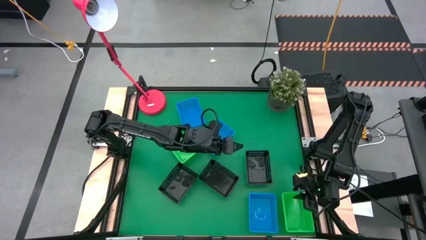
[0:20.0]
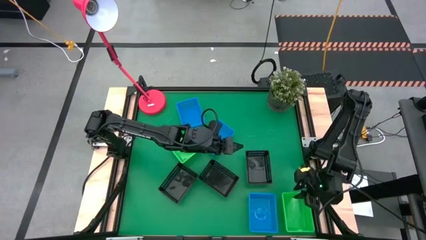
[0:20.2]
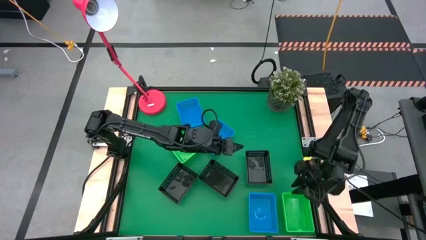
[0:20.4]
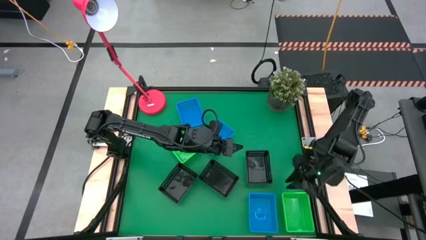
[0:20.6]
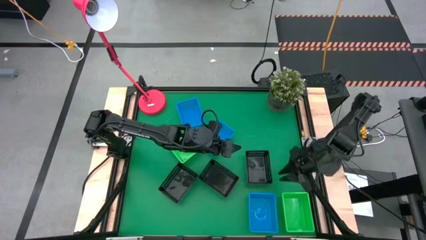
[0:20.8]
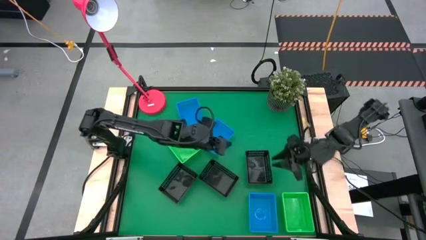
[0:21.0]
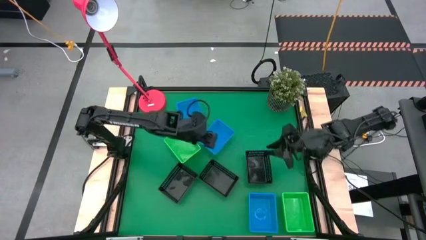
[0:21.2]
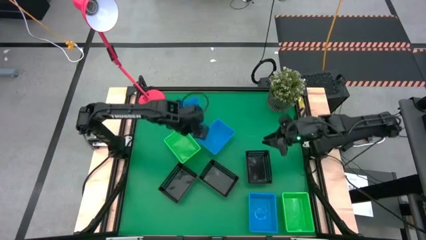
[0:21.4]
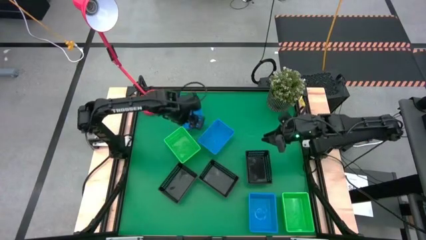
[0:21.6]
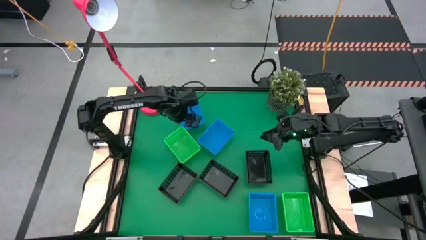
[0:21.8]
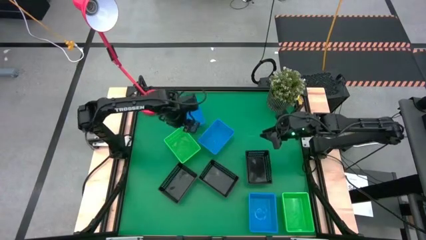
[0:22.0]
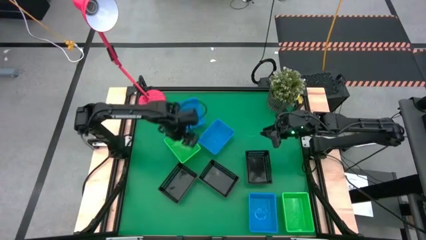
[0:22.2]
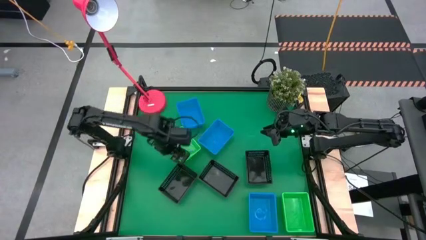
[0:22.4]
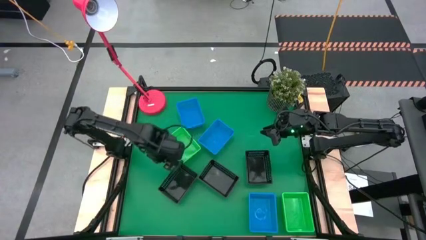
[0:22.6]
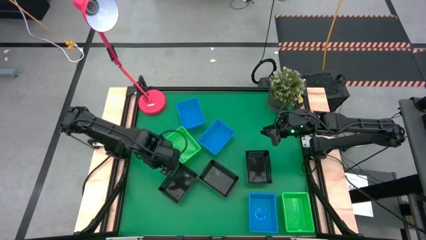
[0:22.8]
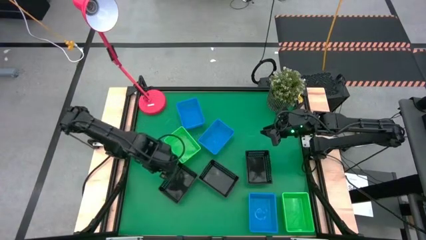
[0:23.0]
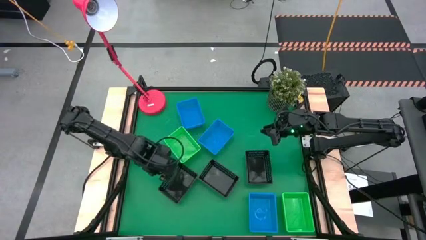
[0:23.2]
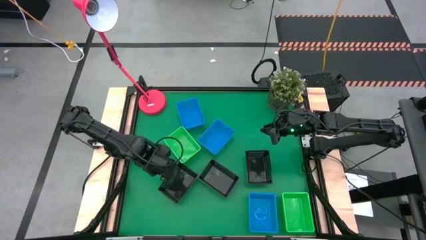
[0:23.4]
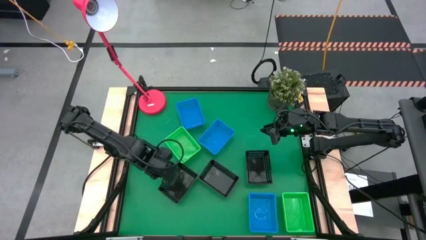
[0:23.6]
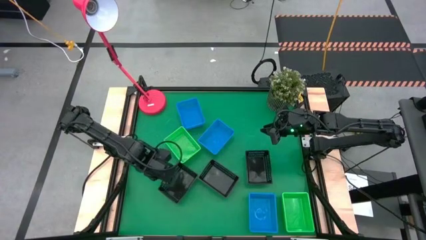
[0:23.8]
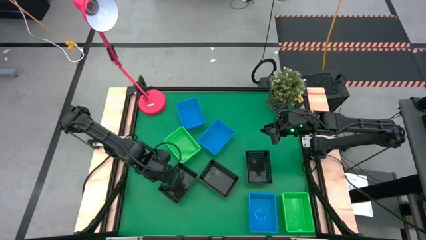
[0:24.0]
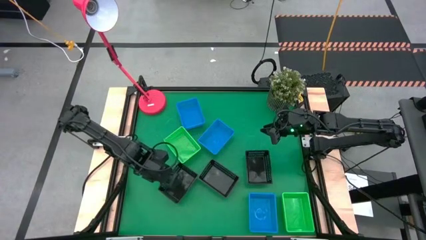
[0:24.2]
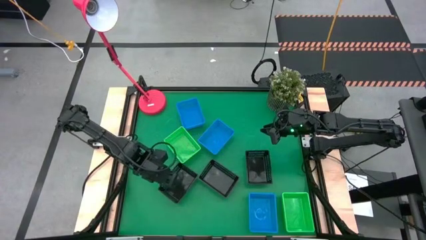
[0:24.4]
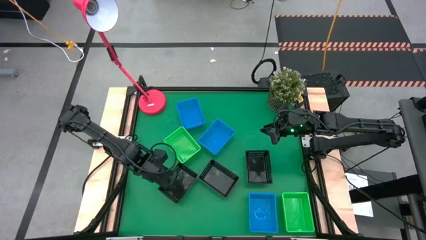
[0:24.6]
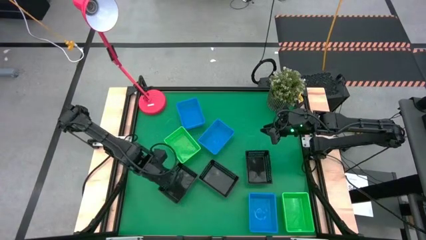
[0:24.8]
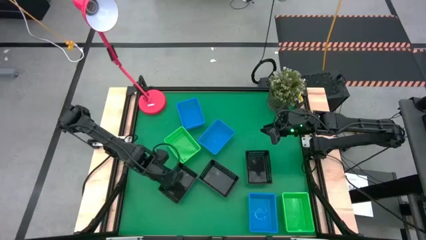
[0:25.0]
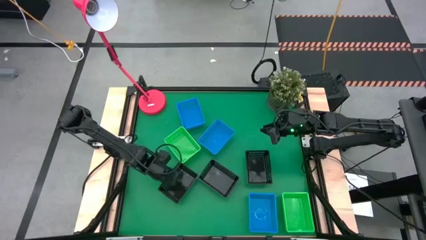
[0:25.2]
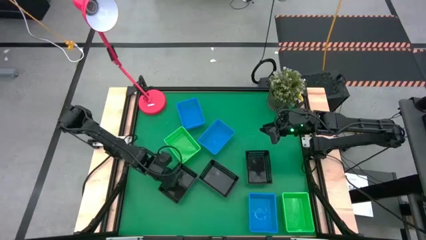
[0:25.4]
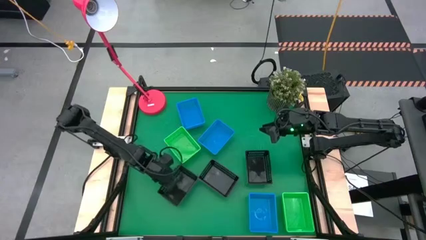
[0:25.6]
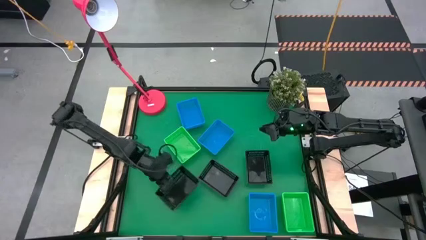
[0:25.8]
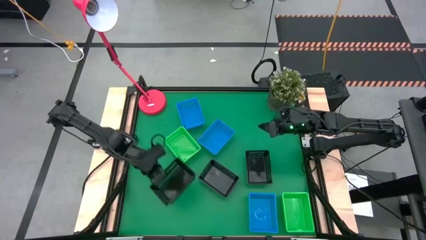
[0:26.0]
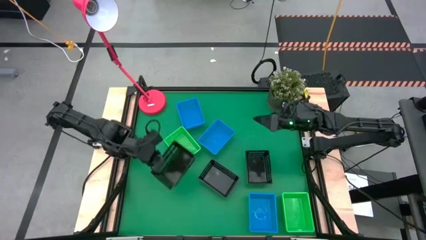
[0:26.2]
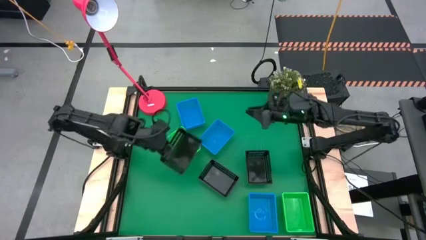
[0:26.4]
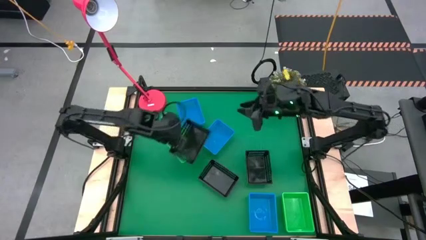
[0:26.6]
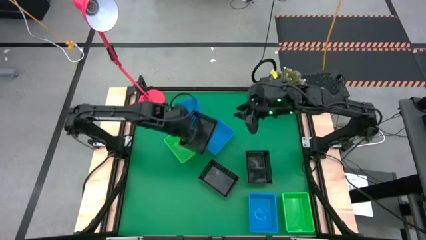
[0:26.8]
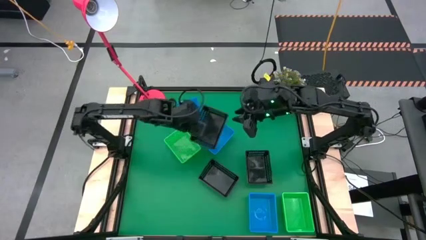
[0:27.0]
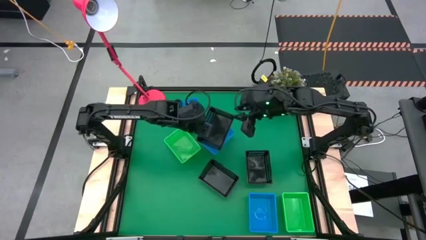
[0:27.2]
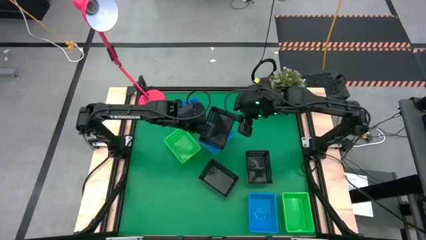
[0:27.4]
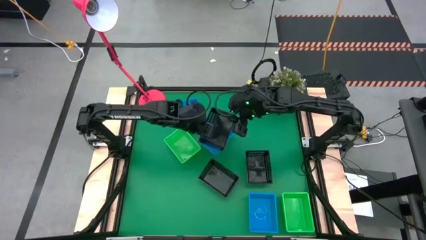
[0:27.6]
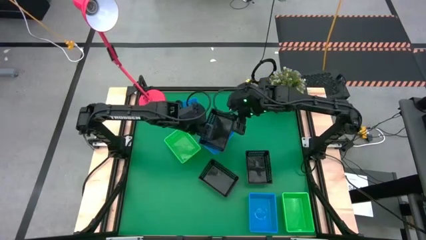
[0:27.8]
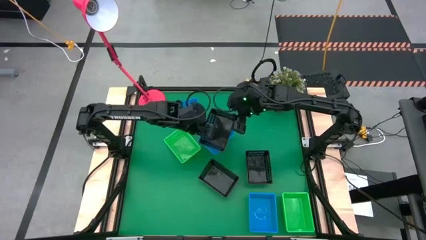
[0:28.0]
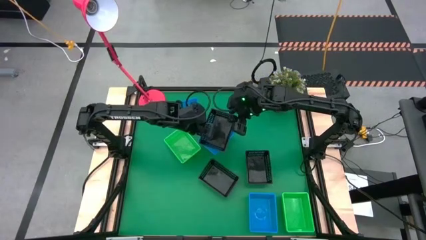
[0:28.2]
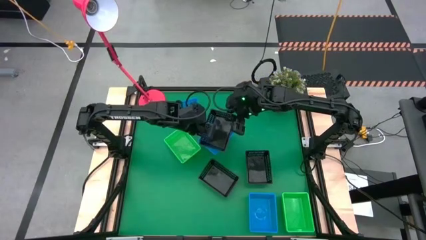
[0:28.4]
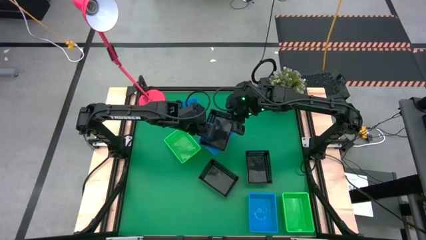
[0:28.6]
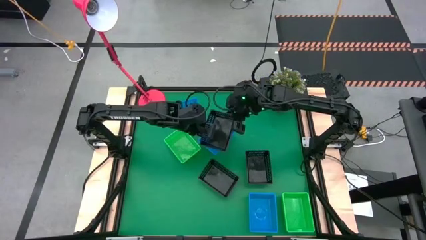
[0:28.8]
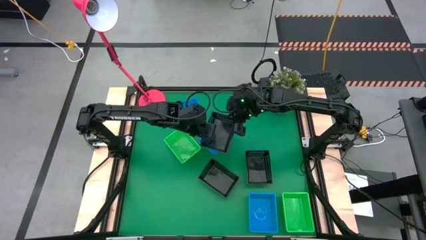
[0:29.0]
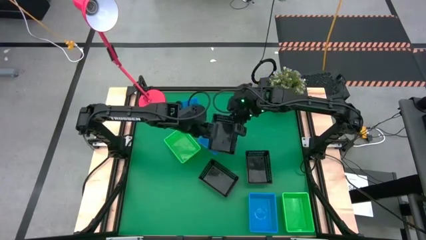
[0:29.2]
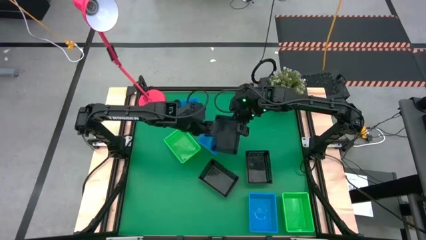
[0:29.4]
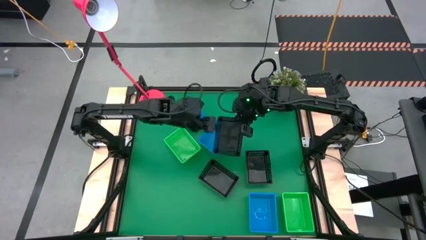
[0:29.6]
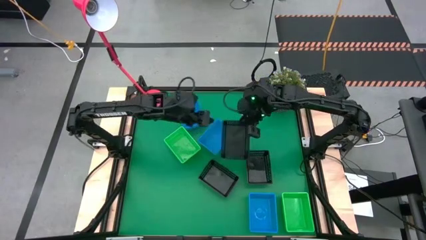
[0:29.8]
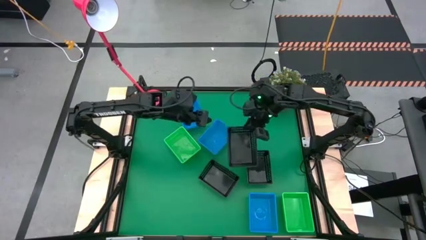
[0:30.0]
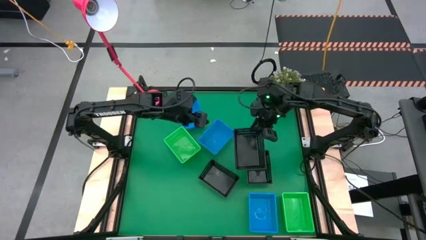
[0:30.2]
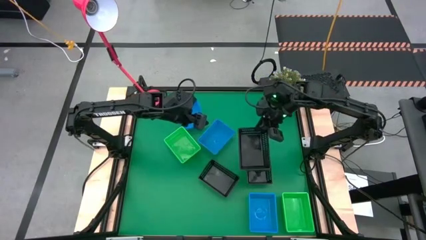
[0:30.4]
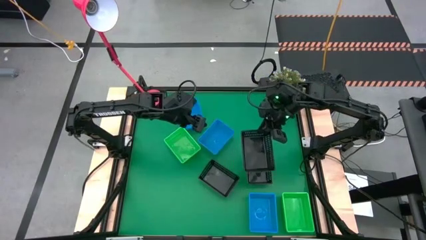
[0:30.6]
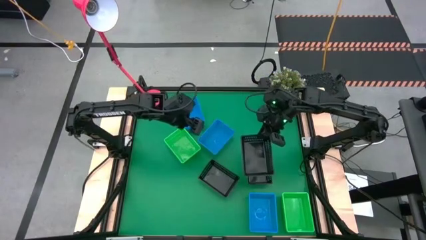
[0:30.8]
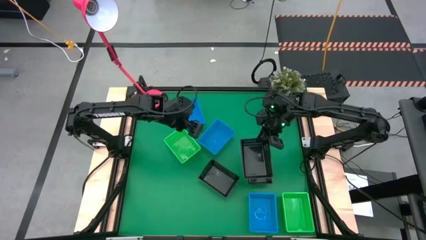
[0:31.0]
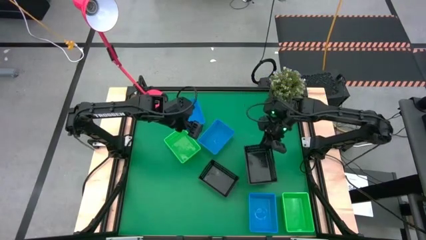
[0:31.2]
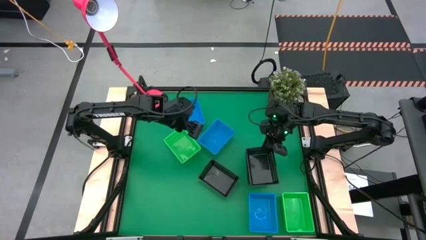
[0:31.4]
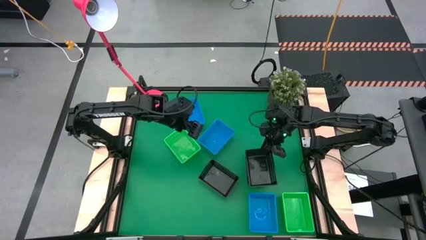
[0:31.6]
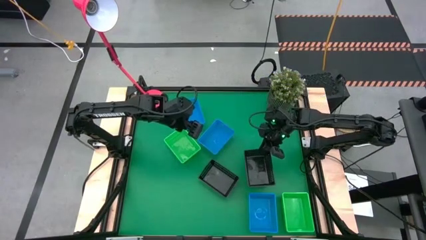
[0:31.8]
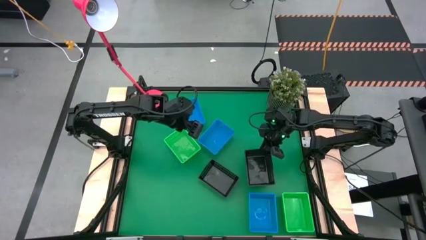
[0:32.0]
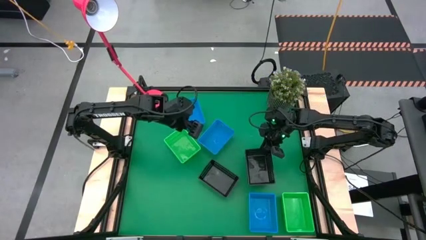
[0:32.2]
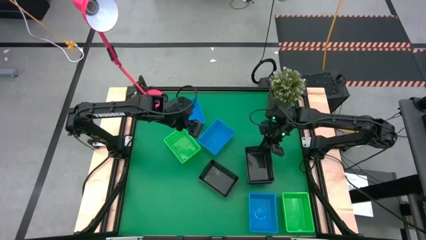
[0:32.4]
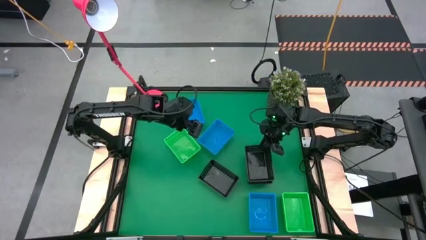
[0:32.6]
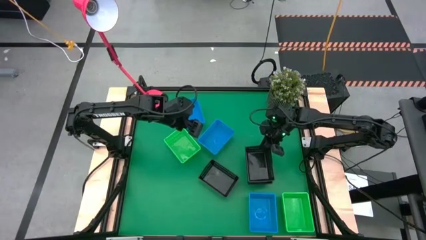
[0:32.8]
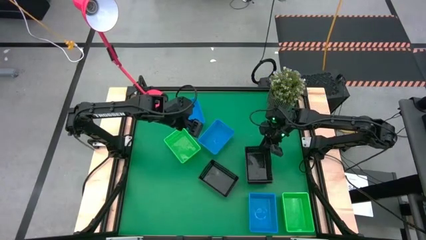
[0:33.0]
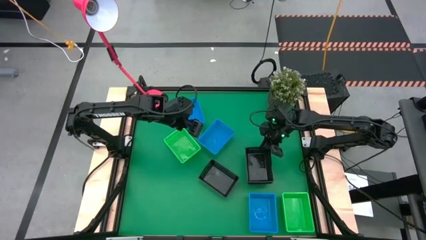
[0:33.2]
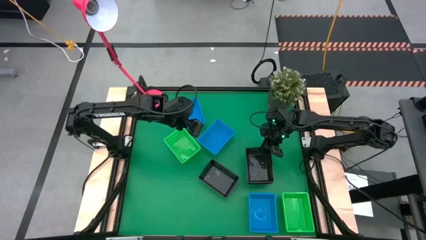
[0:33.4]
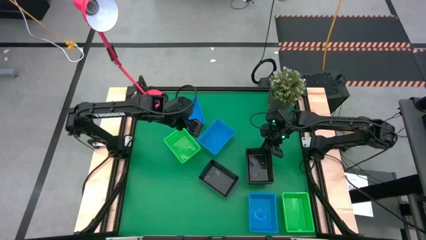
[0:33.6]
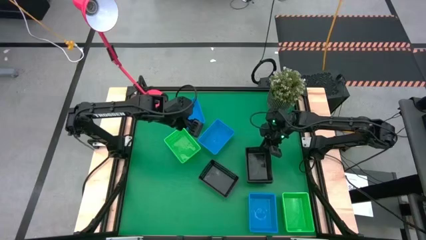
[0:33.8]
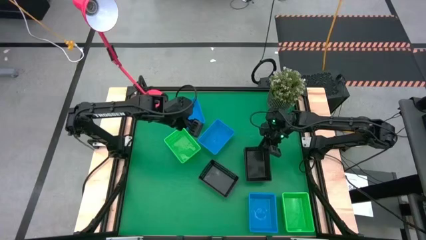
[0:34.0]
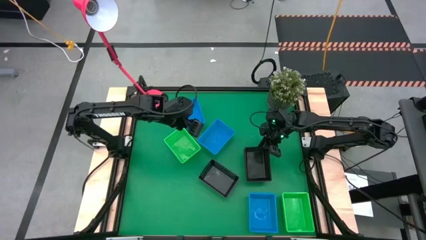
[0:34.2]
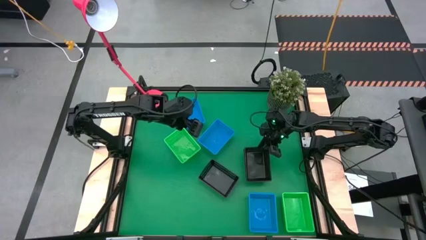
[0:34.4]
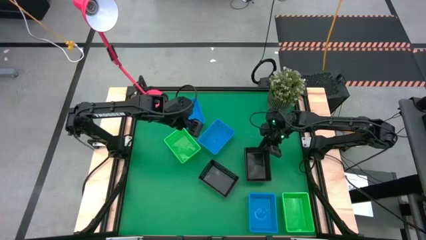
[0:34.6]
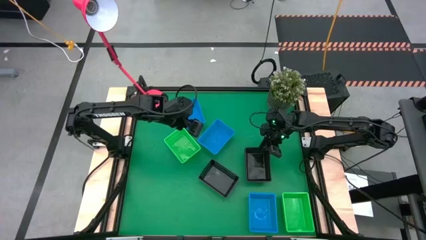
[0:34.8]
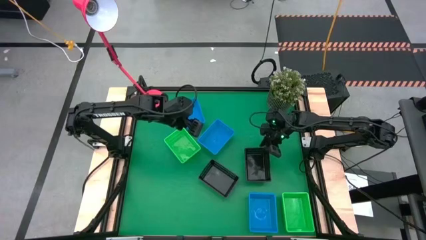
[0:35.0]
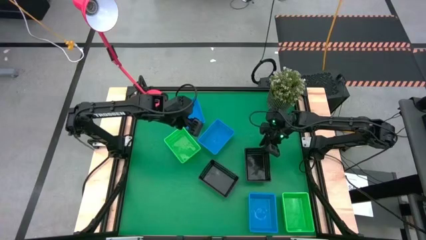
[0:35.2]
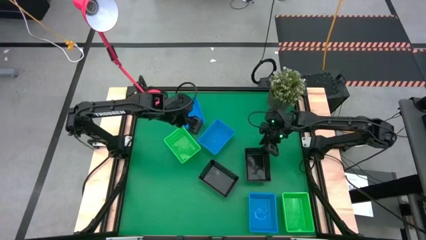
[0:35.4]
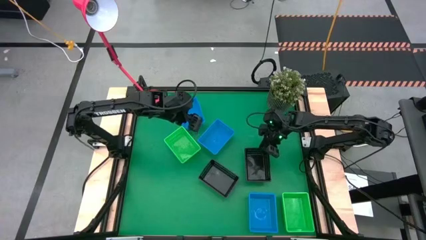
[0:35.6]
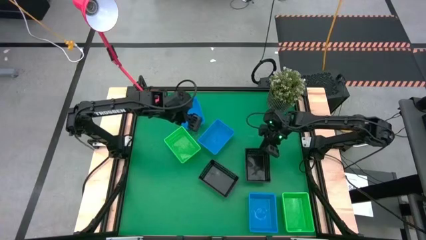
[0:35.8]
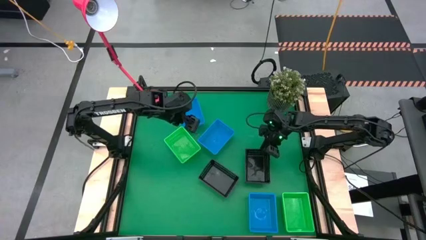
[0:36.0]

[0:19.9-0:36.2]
Stack the left black bin on the right black bin
